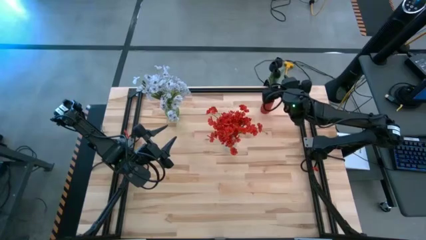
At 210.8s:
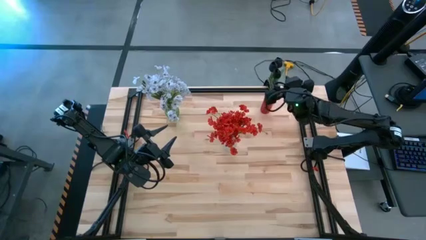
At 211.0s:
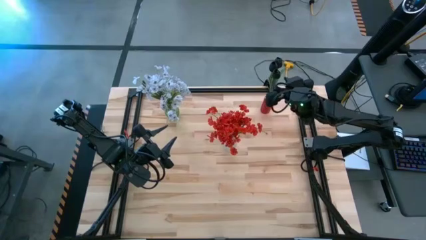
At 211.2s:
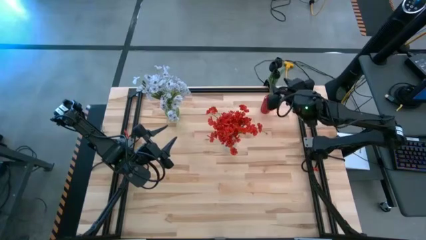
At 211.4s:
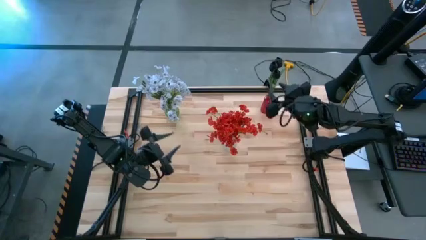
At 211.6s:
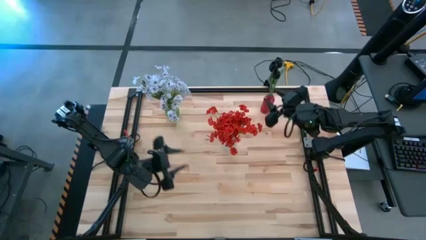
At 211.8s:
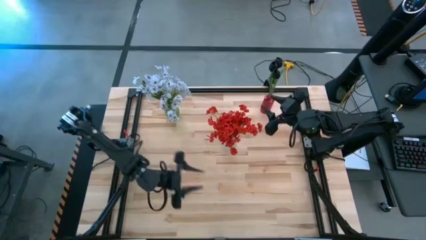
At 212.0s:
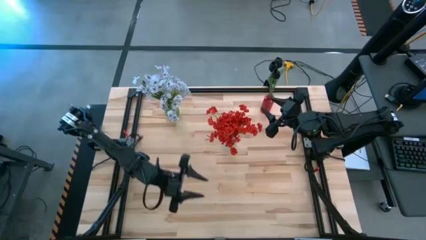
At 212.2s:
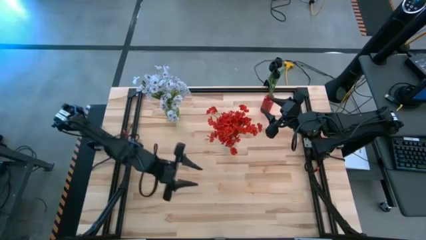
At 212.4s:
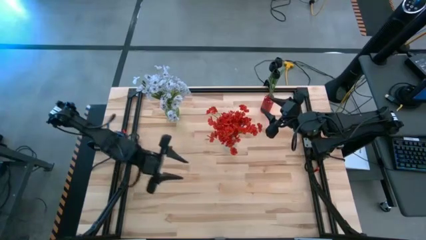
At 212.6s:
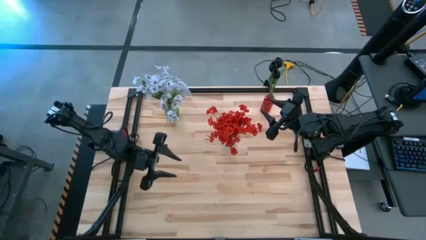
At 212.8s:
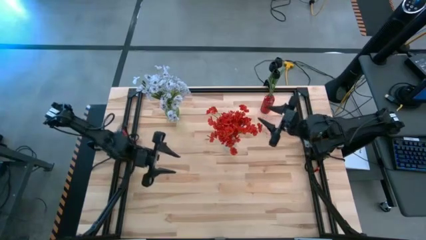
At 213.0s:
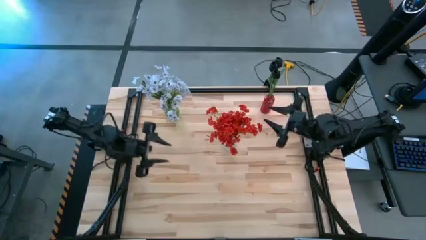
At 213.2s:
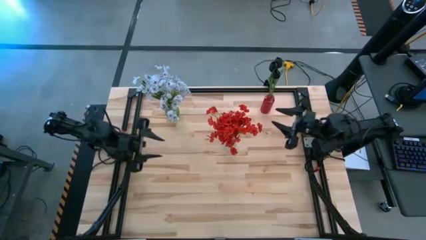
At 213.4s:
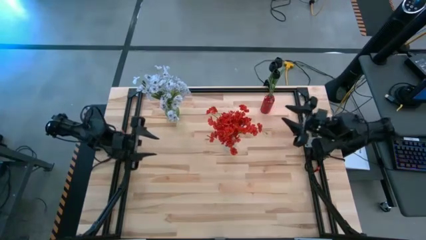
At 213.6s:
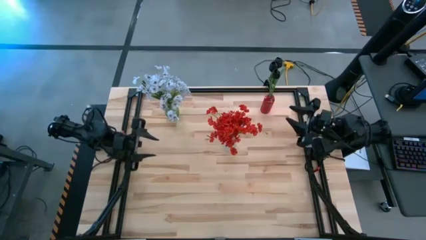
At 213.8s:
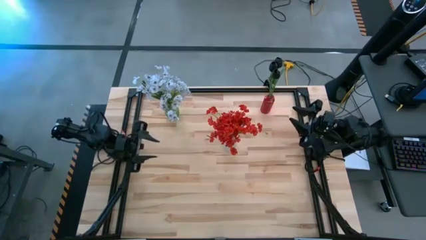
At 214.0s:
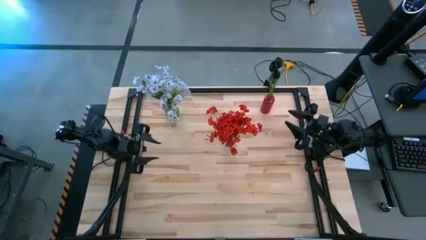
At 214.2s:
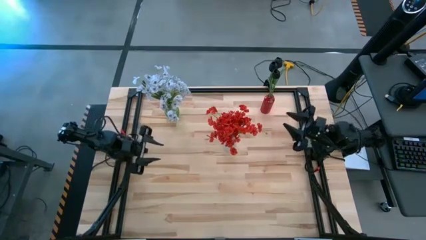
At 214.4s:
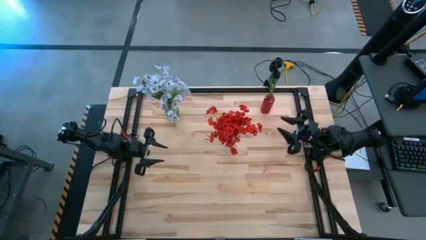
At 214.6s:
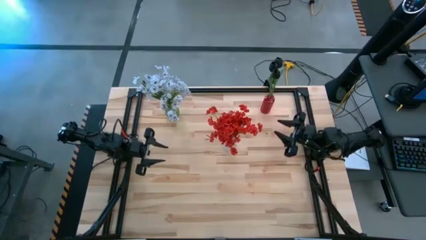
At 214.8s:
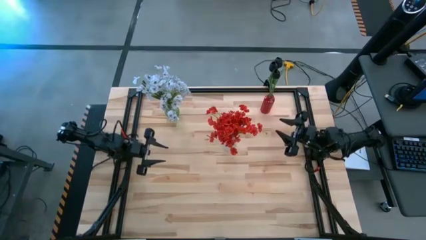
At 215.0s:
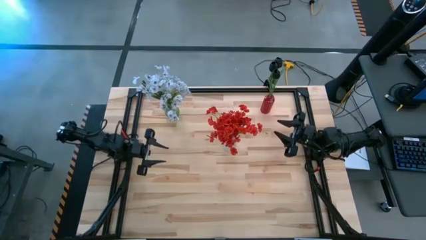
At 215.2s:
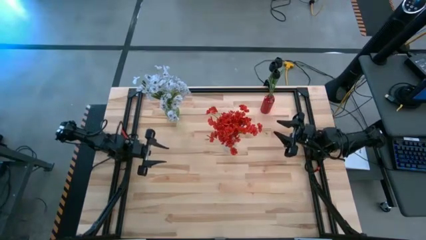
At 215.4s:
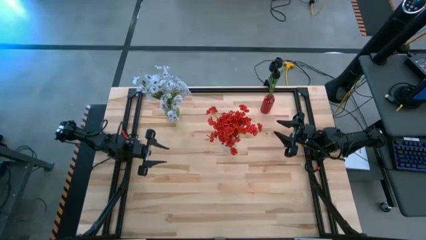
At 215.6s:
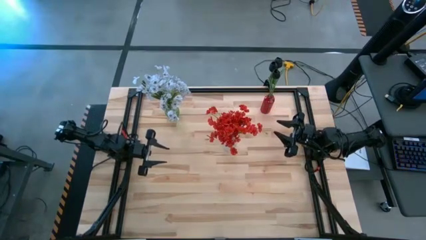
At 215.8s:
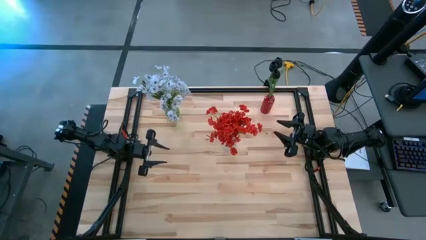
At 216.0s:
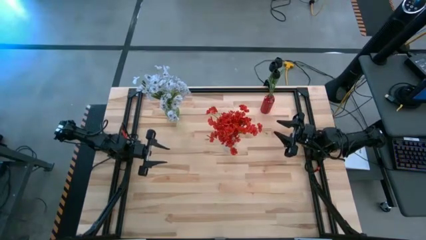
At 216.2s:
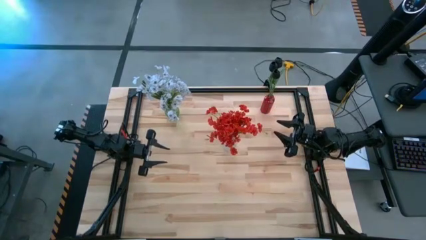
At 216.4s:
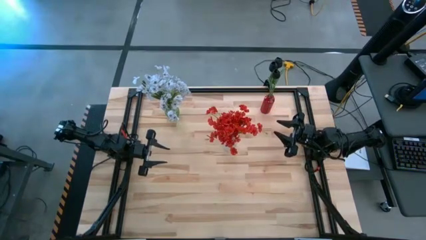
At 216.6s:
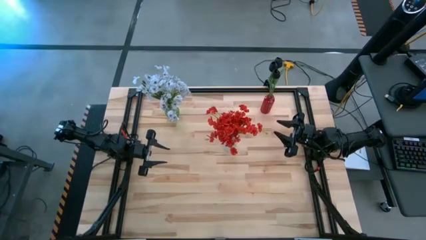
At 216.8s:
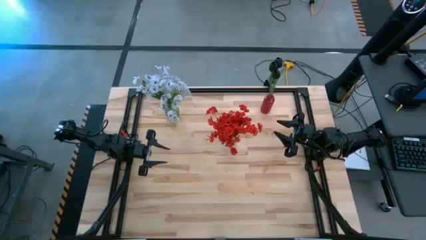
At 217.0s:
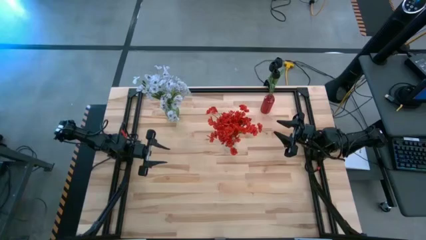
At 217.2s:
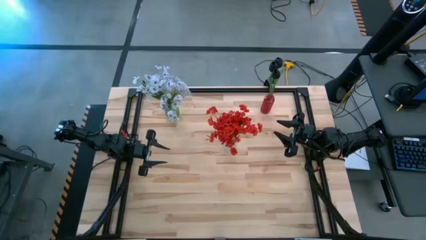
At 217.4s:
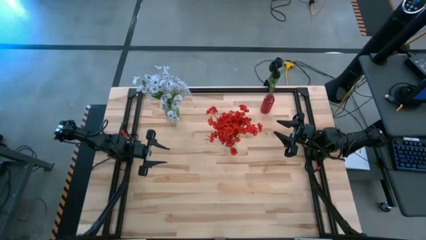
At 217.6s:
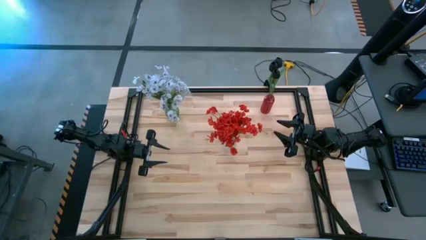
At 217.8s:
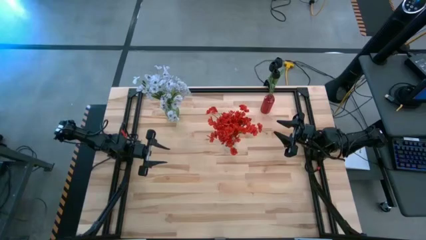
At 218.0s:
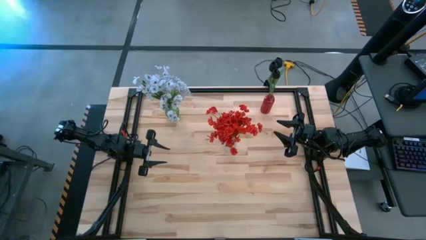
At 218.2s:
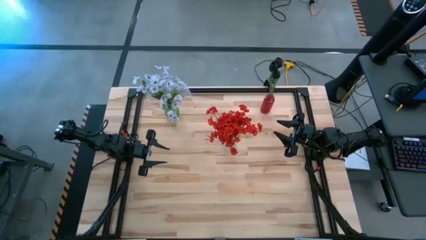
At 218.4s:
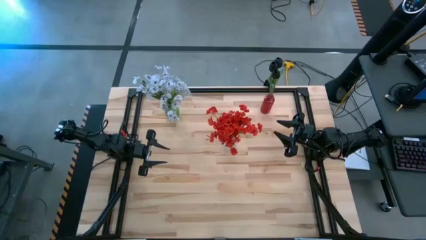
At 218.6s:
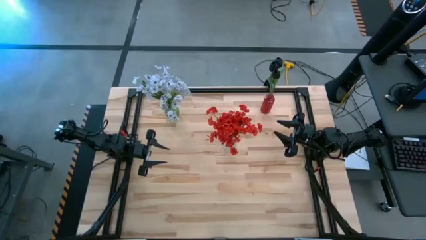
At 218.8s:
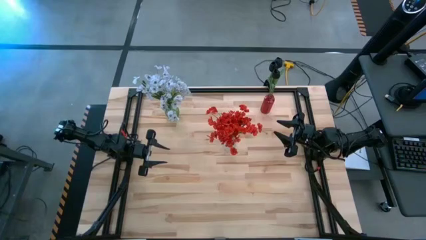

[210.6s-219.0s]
Task: Sort flowers into vase by color
Return to Home Position

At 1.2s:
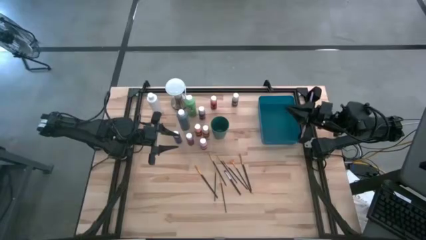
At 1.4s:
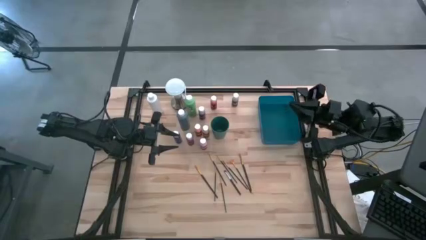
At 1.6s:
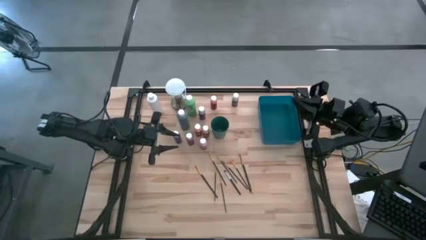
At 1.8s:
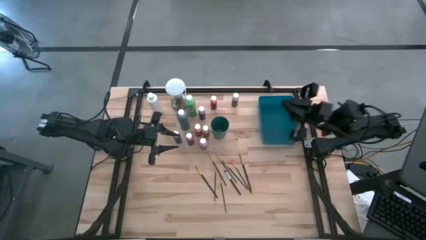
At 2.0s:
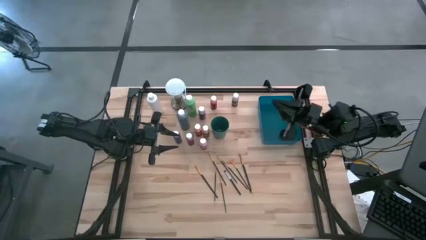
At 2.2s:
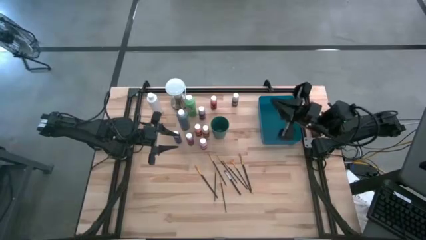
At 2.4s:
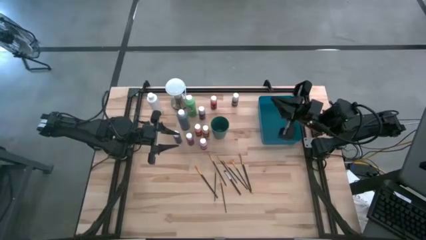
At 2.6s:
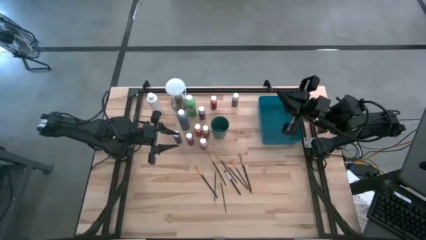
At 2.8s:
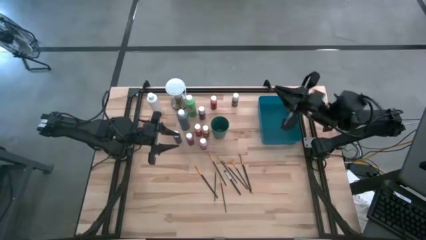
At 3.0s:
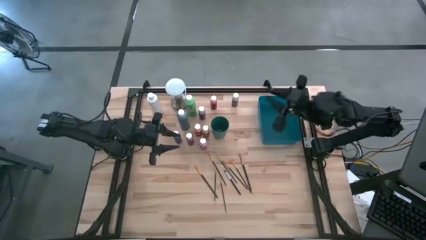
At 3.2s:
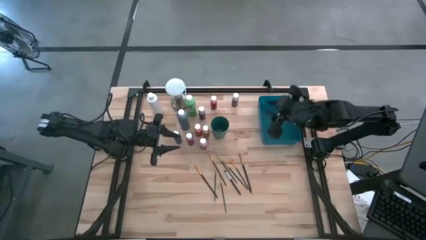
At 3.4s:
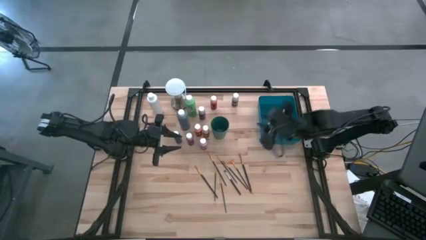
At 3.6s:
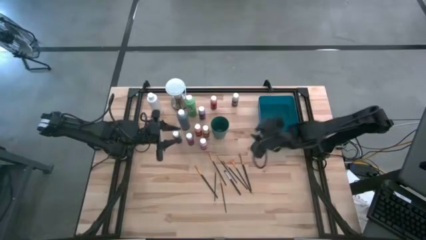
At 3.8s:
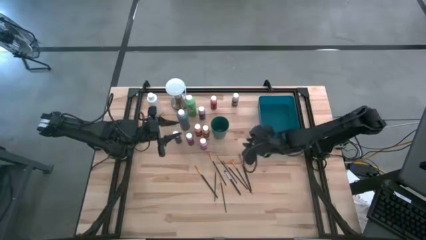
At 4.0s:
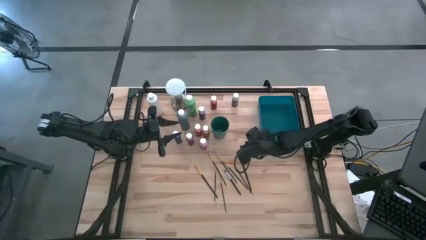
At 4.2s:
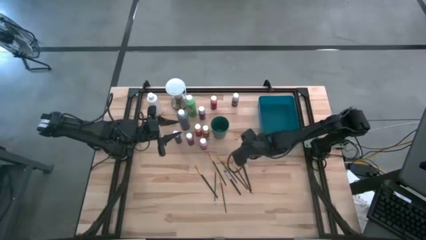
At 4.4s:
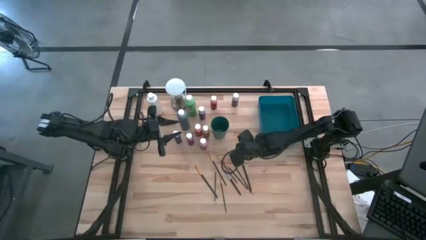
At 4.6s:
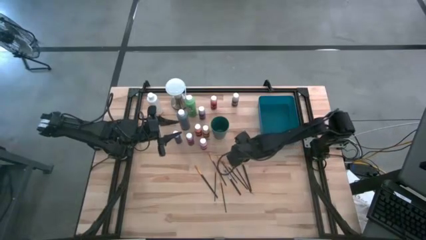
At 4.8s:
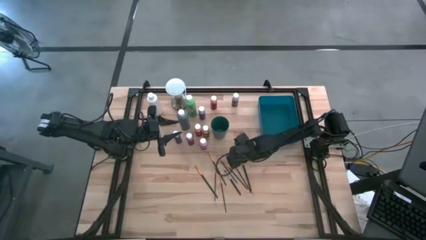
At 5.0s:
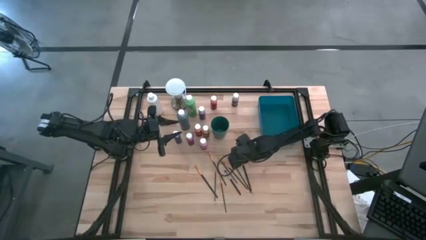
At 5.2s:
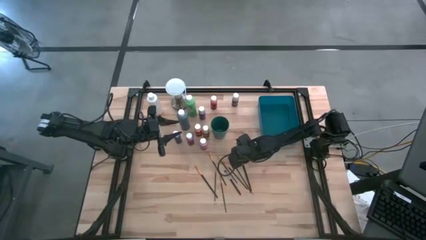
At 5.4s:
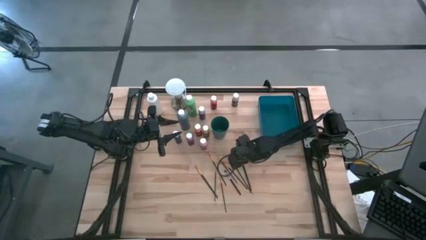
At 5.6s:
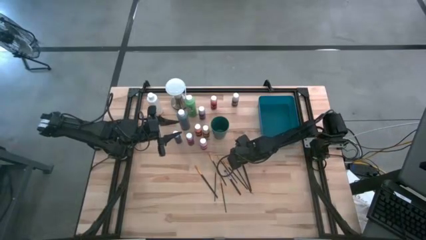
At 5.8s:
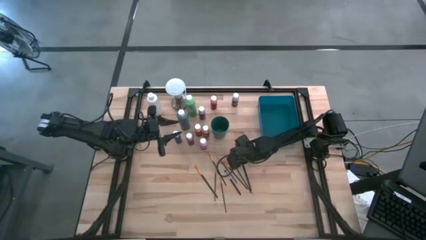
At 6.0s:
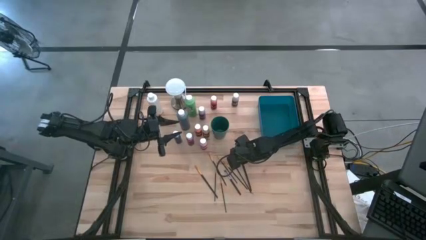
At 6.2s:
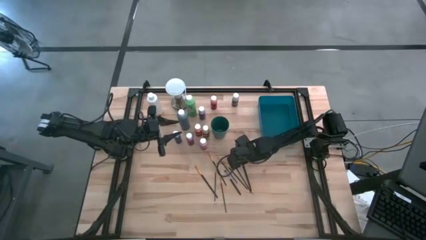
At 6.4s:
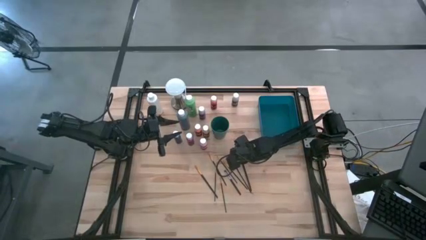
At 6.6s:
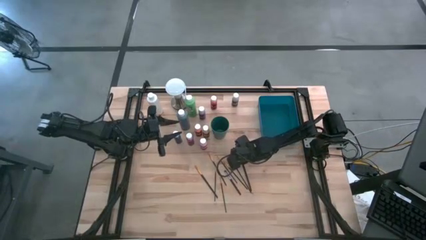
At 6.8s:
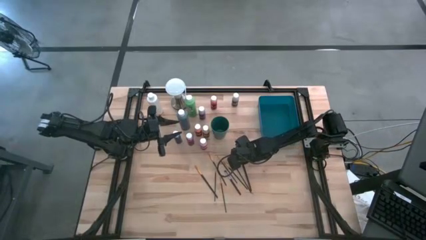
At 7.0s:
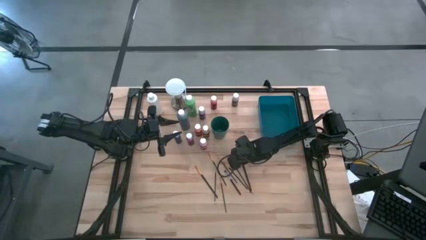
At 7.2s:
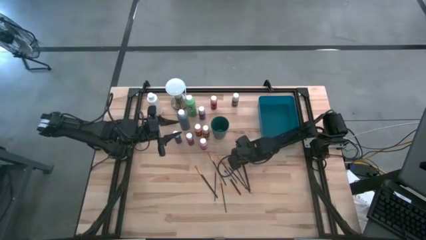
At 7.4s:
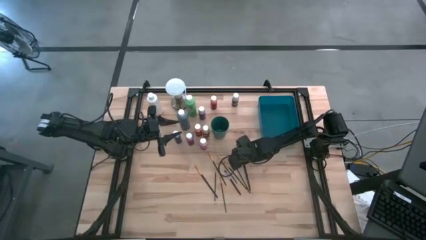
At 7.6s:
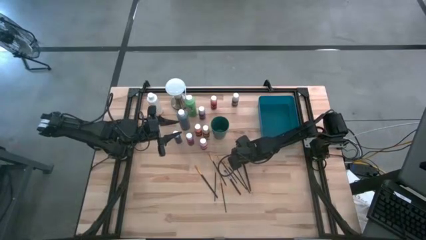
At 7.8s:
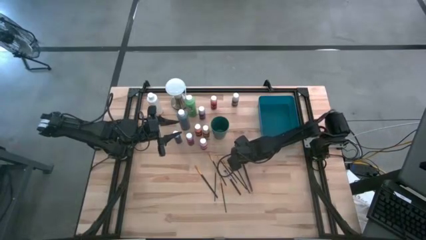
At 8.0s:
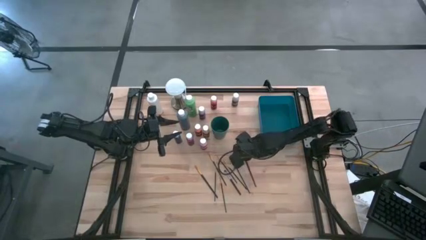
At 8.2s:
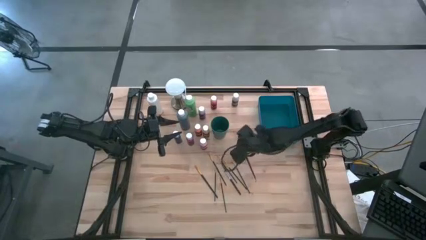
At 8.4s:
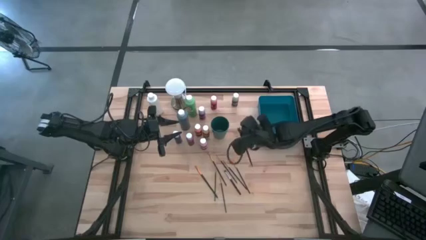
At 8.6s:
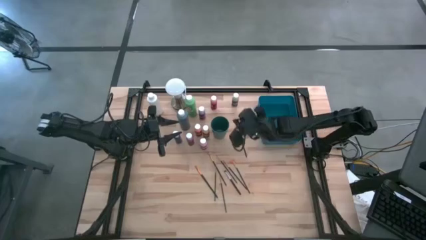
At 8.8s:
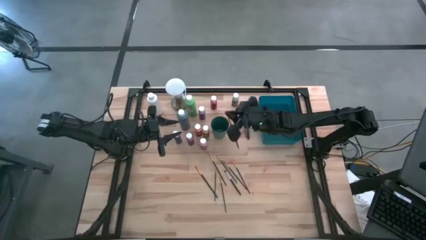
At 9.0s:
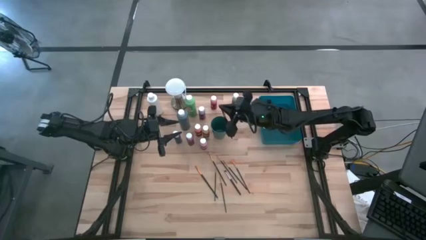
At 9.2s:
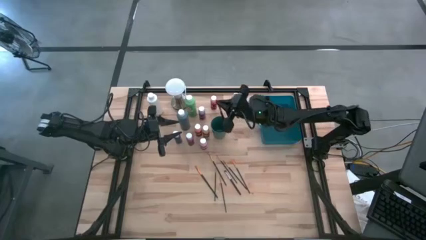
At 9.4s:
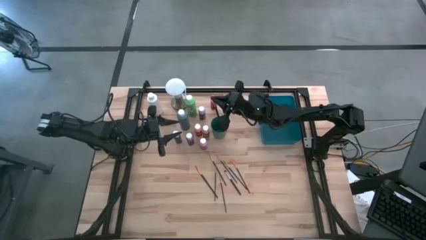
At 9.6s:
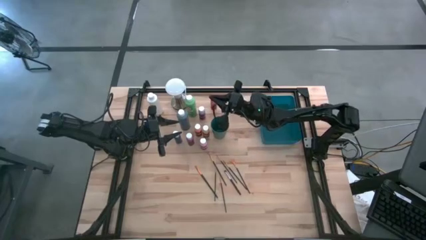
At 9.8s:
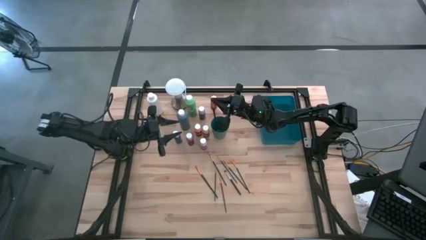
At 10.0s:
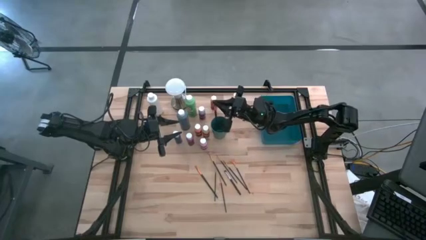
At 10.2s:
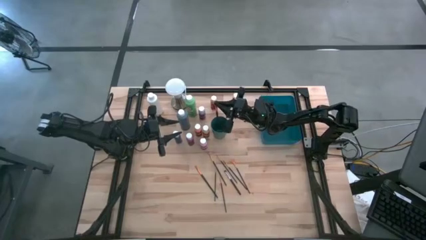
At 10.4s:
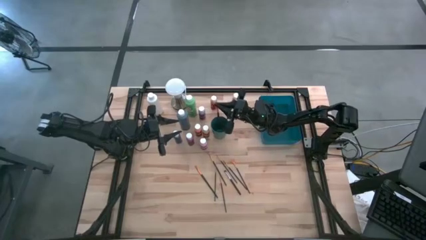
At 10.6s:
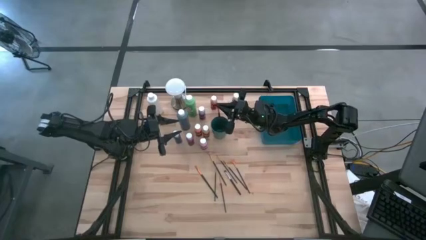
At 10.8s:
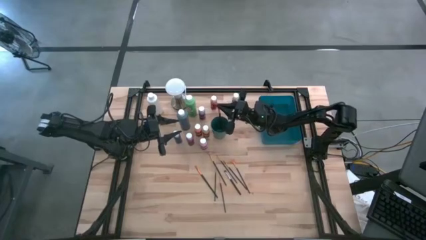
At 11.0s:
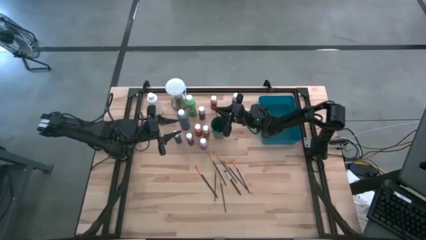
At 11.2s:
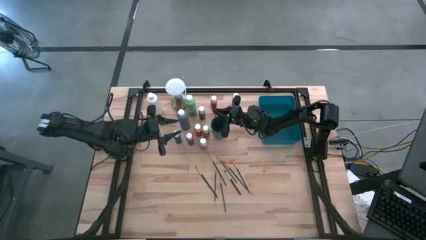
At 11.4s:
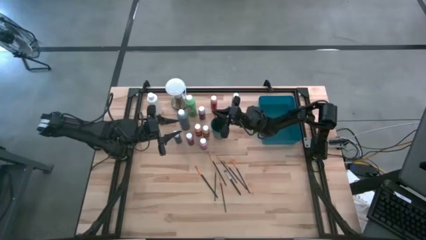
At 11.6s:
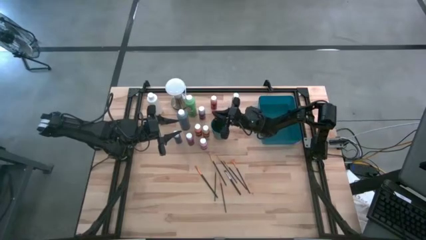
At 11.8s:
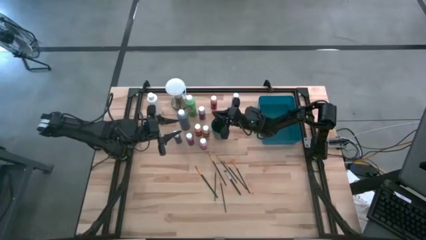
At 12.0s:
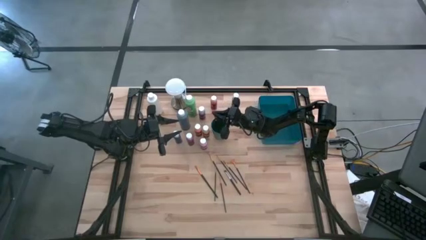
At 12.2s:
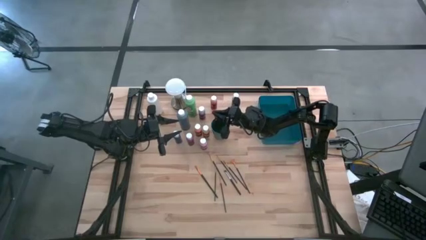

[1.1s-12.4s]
Task: Pick & Place Paint Supplies
Put the gold paint brush into the green cup
